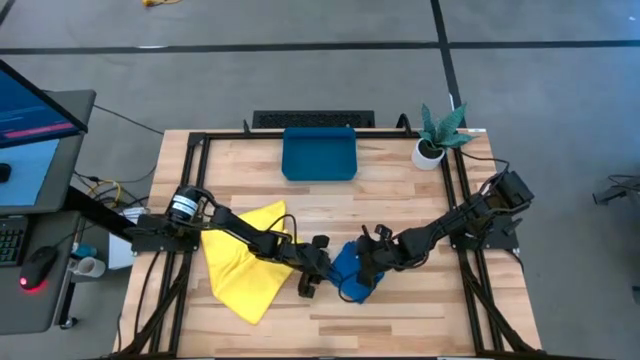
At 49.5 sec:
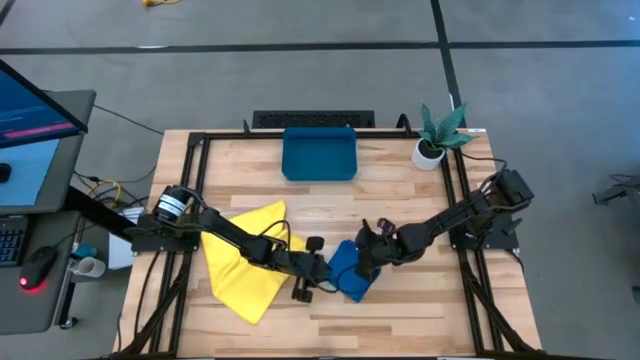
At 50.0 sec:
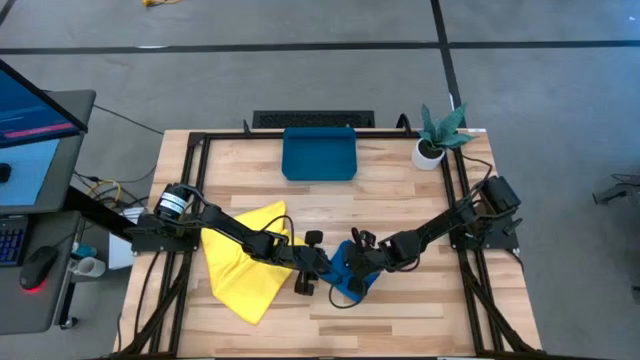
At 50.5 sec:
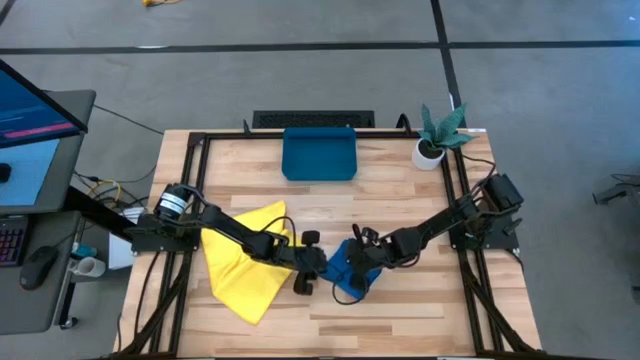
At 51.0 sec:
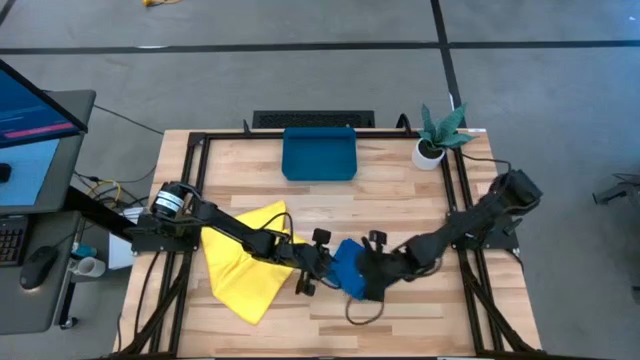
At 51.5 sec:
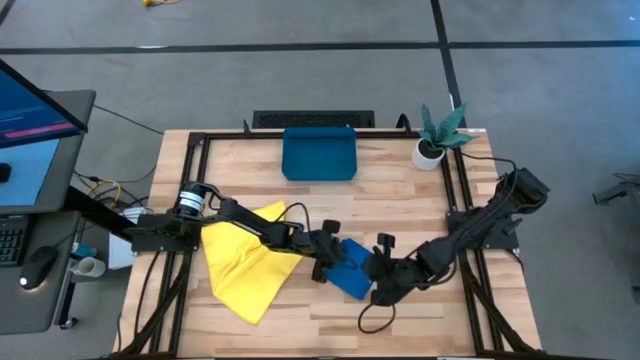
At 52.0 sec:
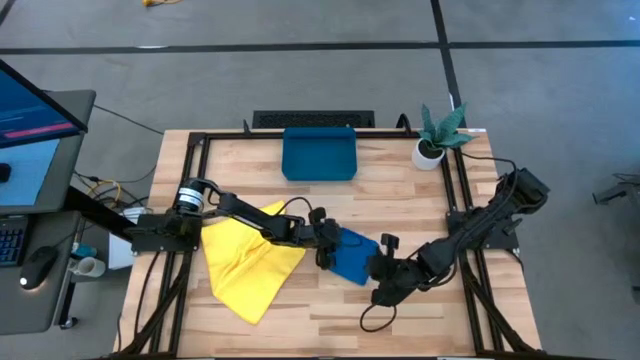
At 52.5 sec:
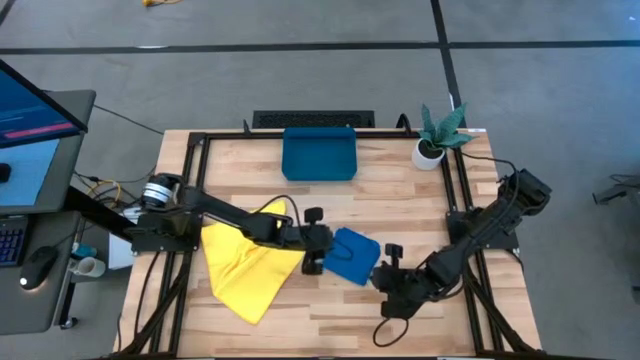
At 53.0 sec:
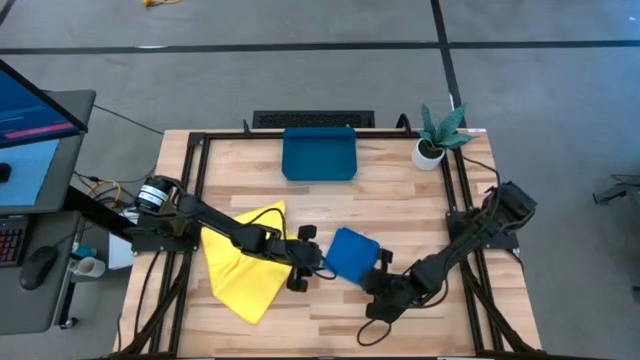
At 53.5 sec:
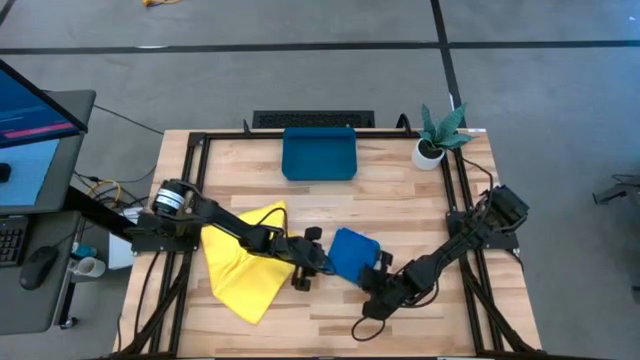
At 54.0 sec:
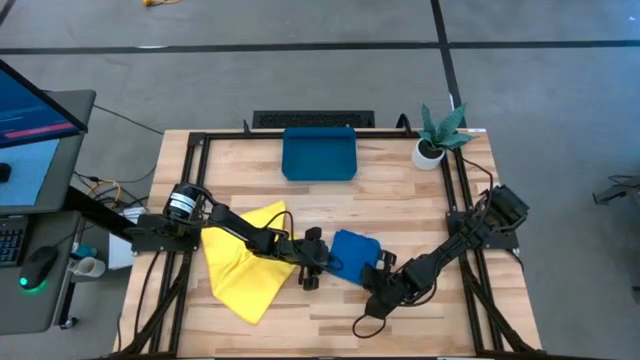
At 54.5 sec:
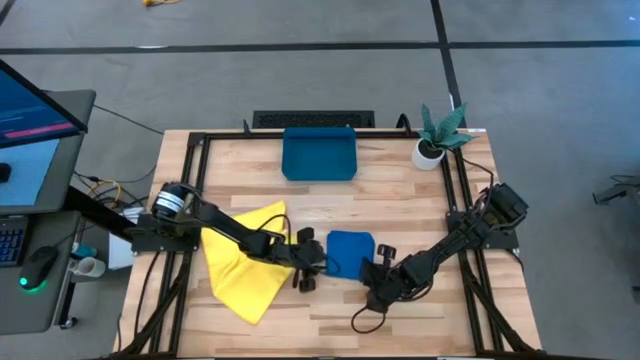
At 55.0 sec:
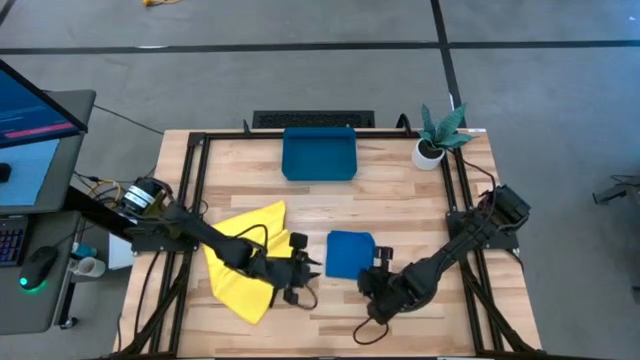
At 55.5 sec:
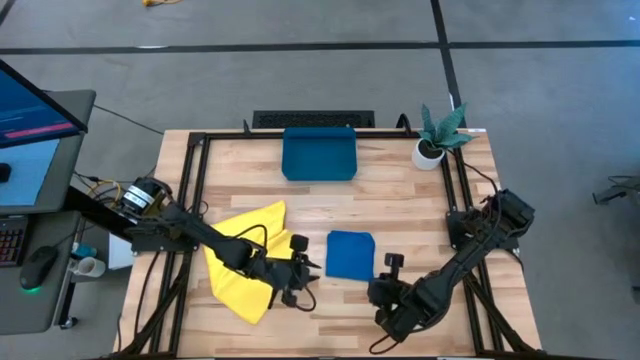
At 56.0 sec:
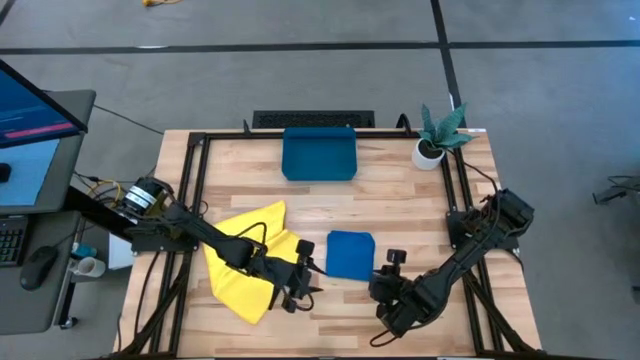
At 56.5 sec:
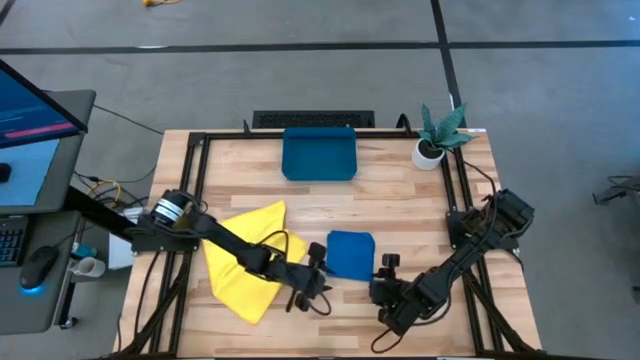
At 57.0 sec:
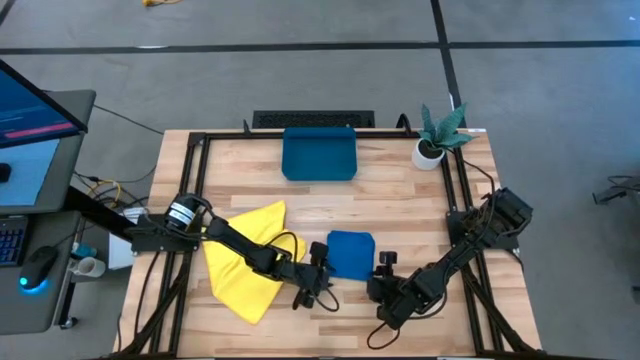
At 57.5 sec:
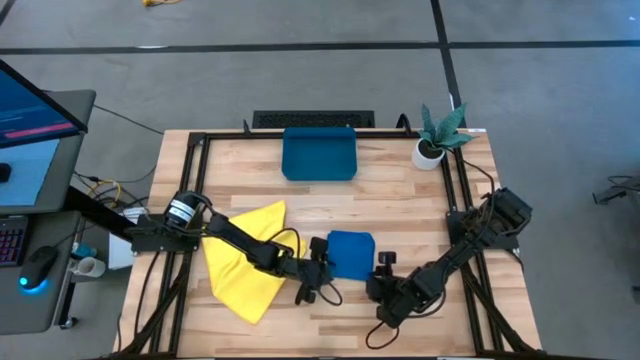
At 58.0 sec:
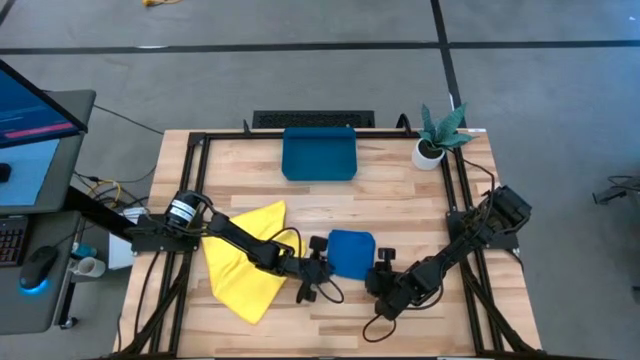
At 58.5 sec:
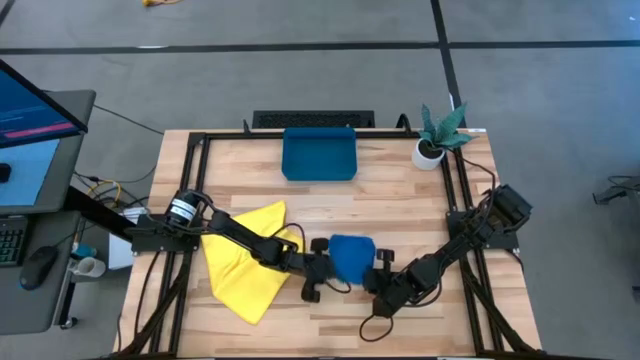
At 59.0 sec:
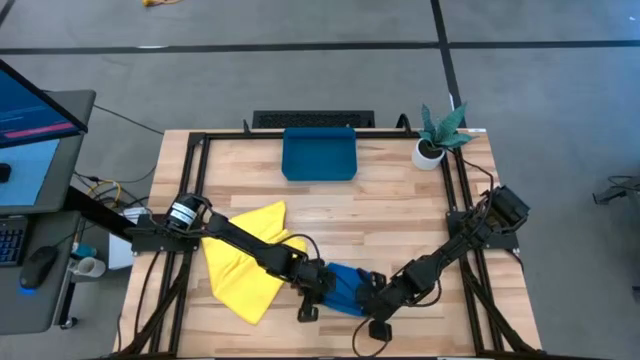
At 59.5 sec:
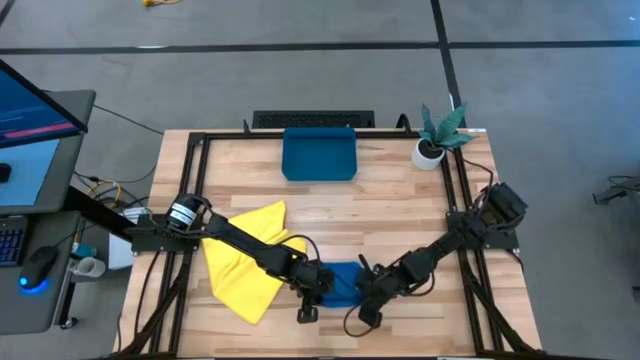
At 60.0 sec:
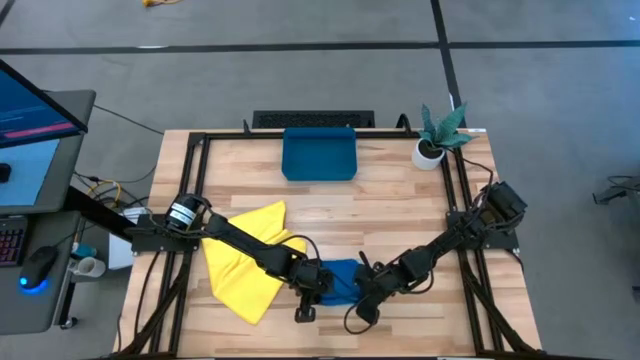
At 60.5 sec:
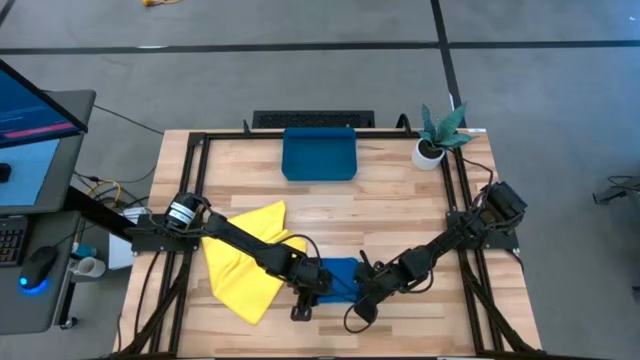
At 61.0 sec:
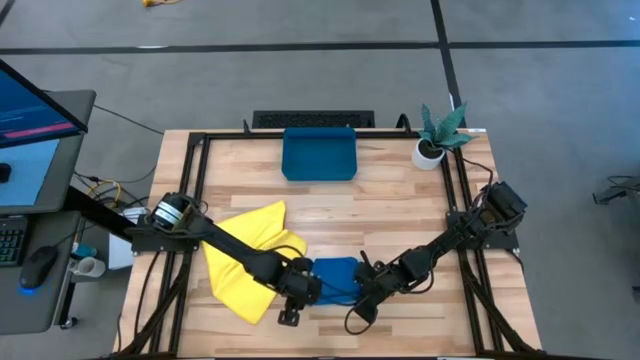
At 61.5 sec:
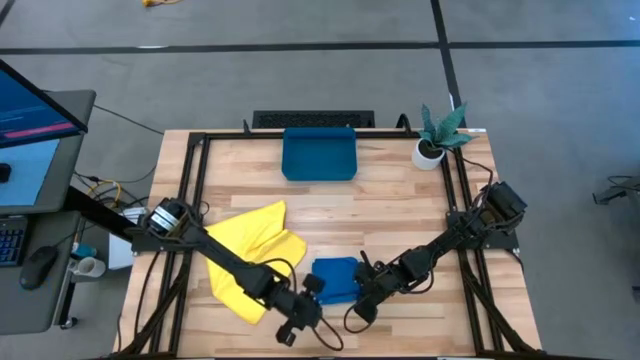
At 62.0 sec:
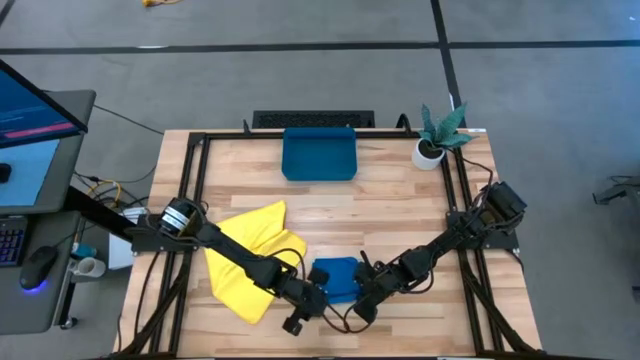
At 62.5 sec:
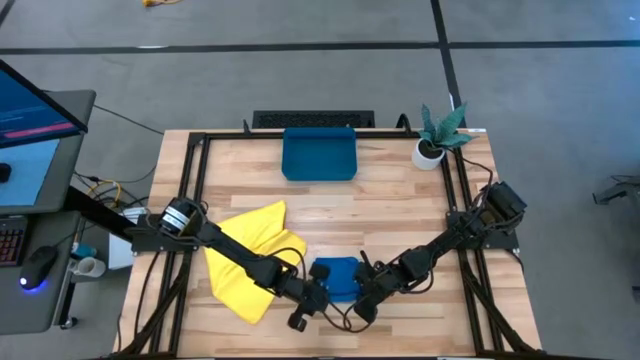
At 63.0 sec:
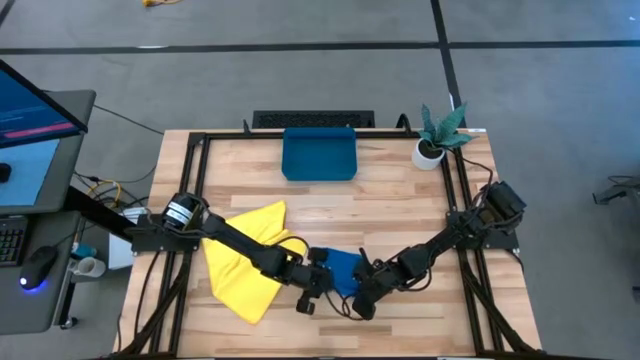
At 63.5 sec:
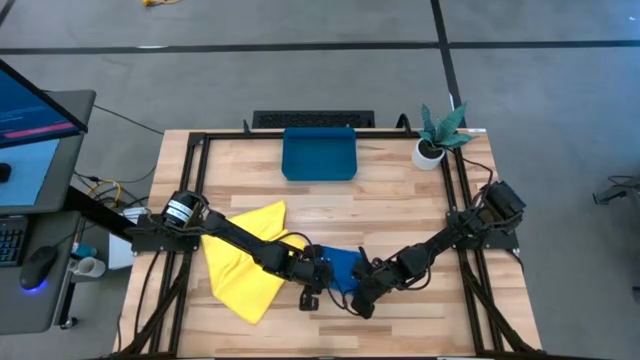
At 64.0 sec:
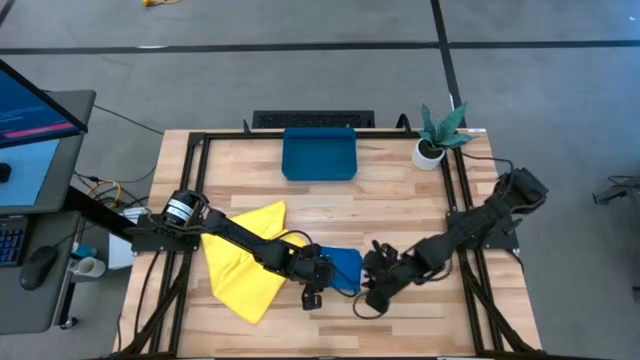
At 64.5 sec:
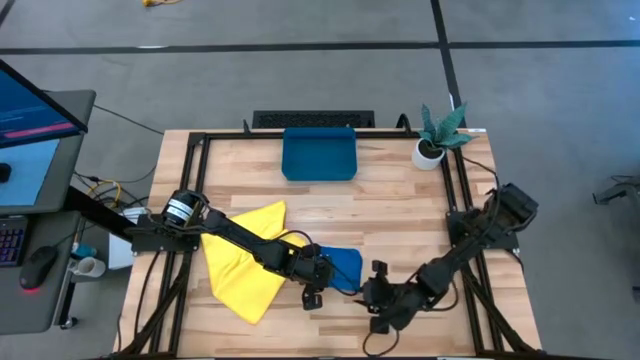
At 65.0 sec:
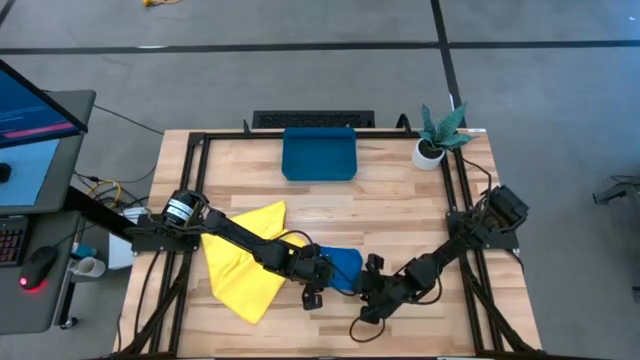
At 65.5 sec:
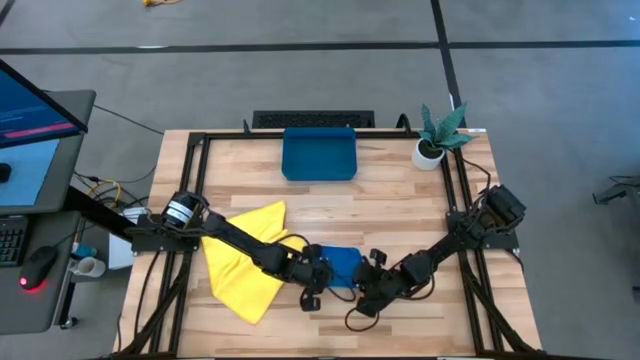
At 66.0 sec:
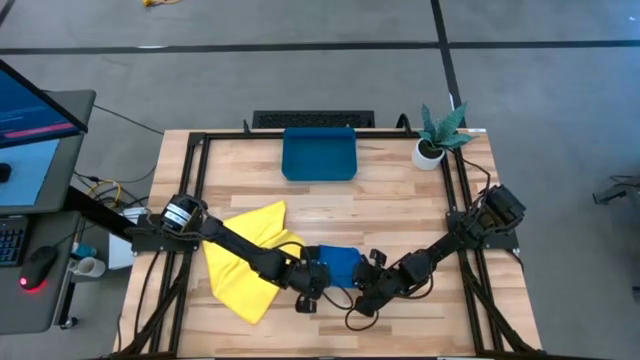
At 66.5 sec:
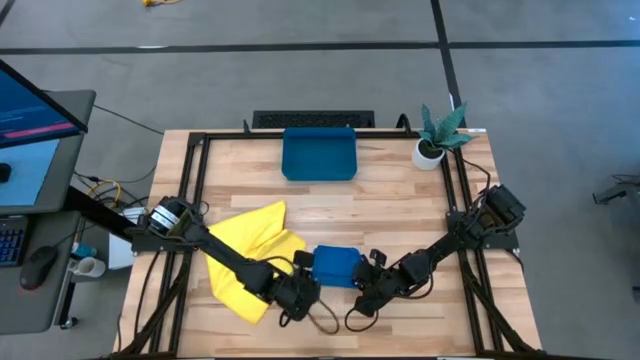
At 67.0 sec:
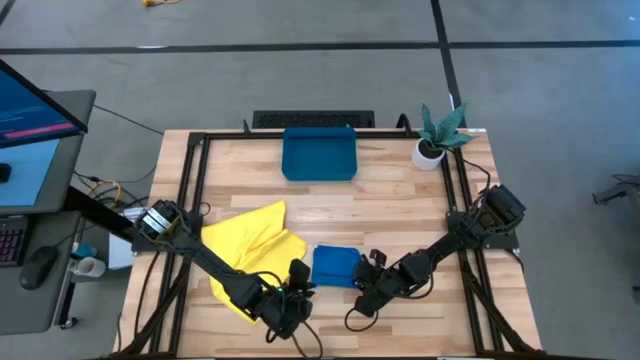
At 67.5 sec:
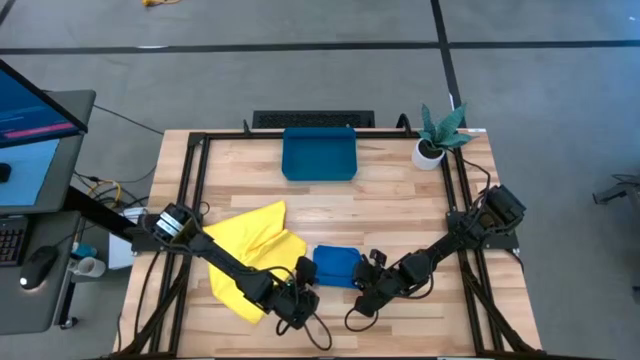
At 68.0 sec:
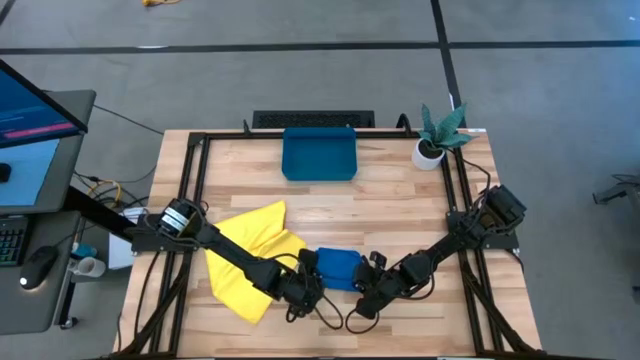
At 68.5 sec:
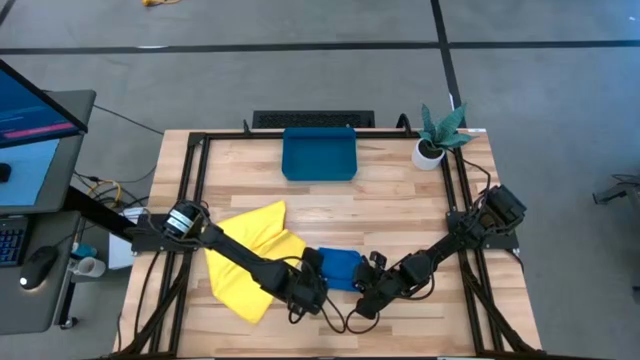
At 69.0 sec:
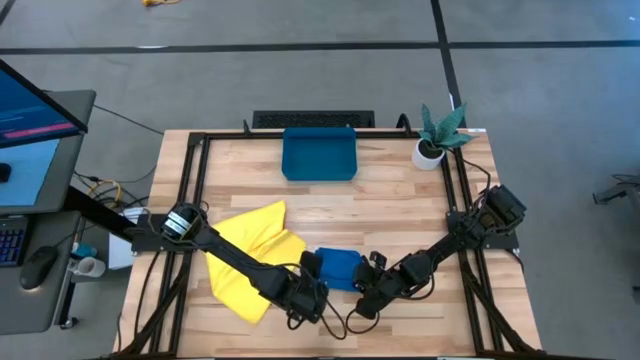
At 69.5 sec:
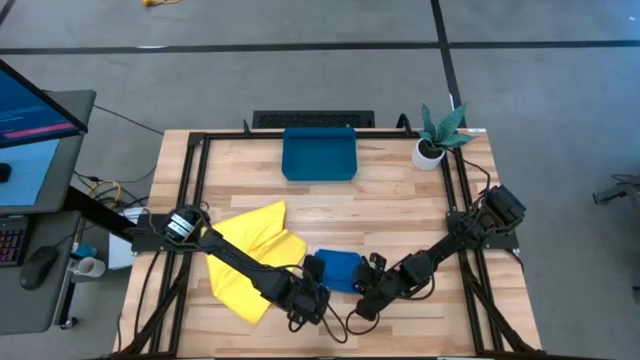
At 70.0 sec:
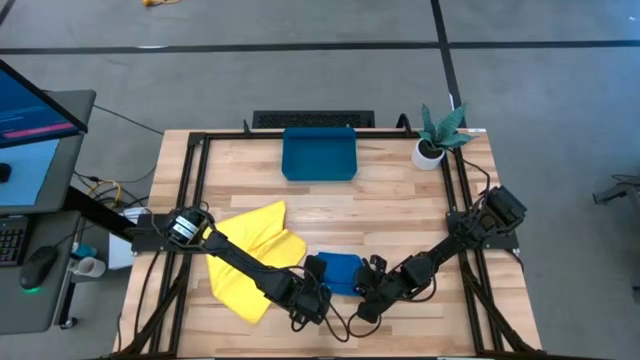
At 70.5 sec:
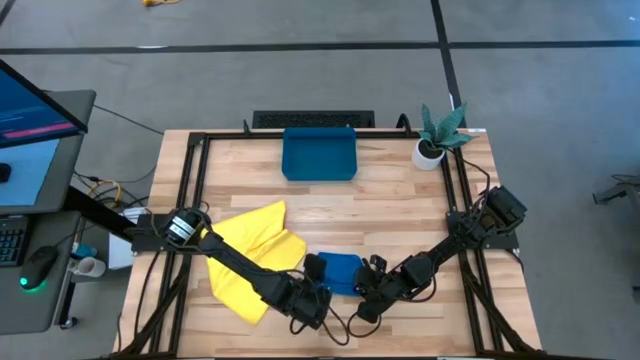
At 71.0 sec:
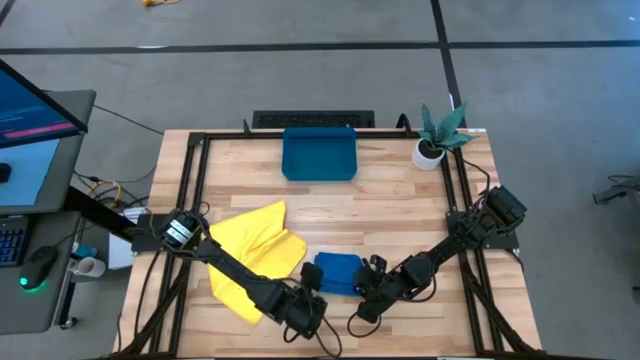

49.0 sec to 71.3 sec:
Task: Roll microfiber towels into tight, uniform cylinder then place into a basket
Roll the blue microfiber cloth
